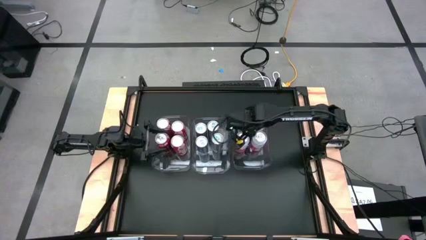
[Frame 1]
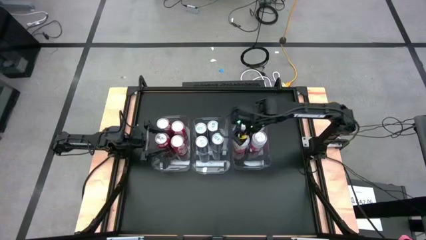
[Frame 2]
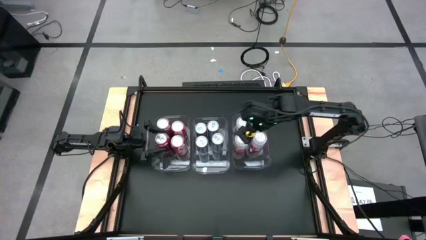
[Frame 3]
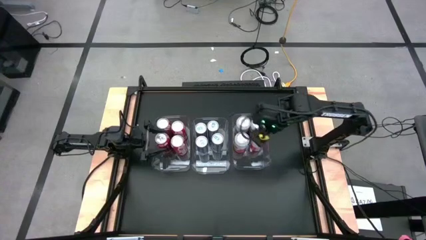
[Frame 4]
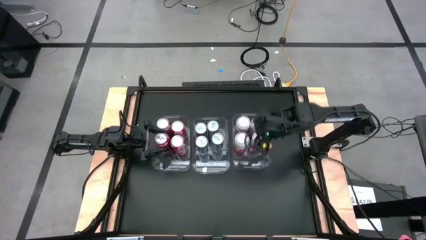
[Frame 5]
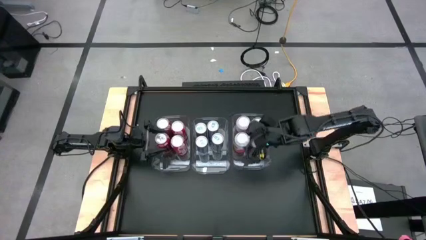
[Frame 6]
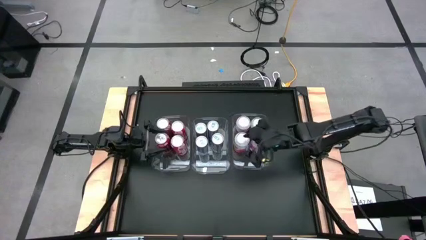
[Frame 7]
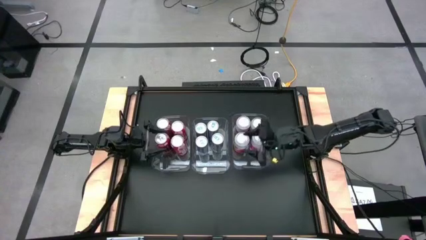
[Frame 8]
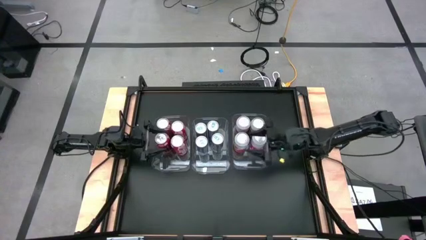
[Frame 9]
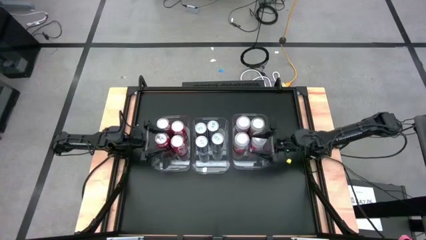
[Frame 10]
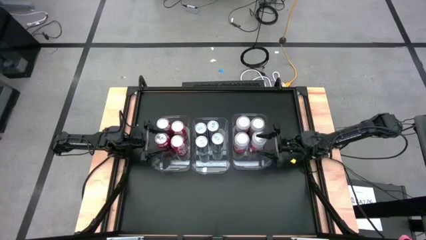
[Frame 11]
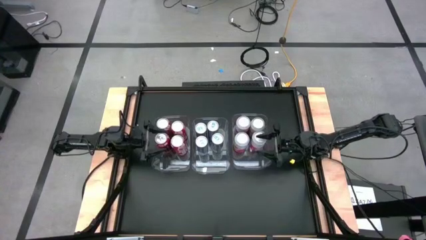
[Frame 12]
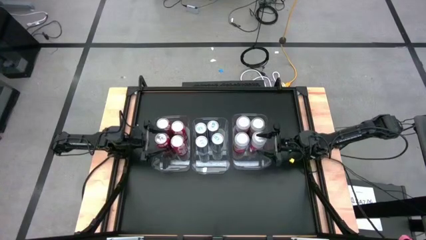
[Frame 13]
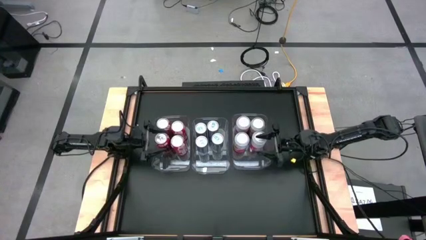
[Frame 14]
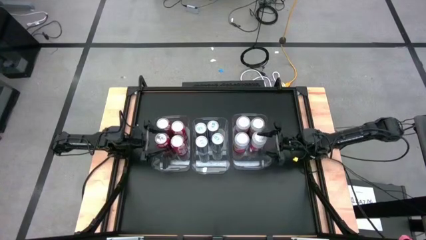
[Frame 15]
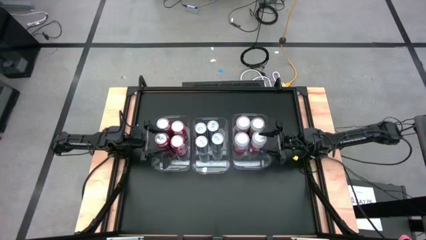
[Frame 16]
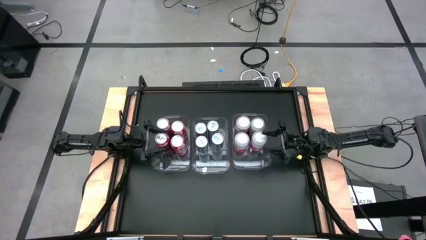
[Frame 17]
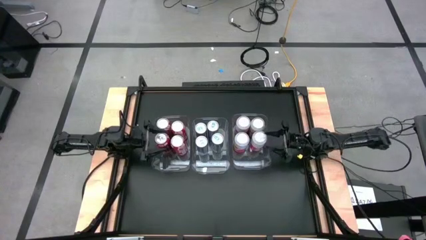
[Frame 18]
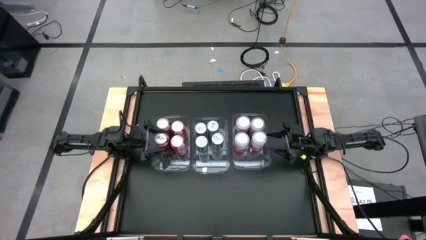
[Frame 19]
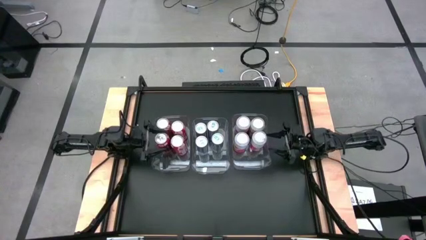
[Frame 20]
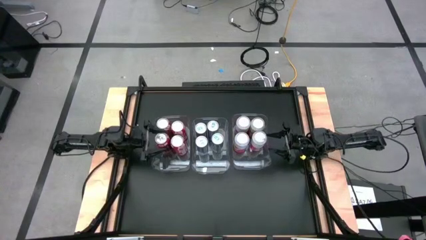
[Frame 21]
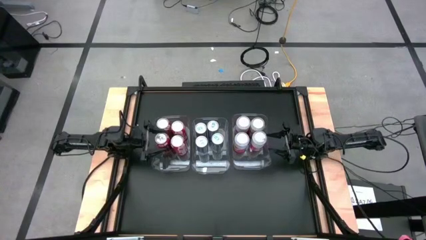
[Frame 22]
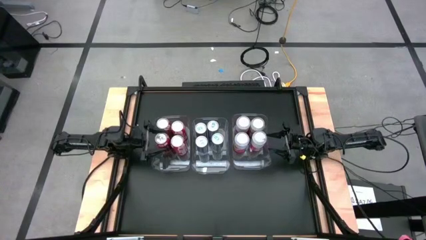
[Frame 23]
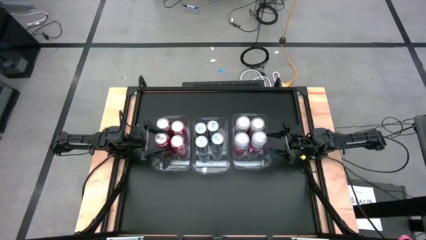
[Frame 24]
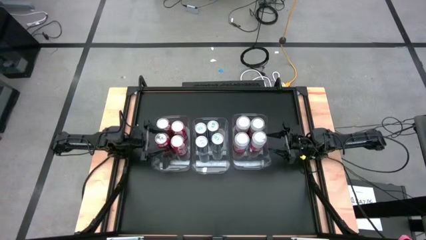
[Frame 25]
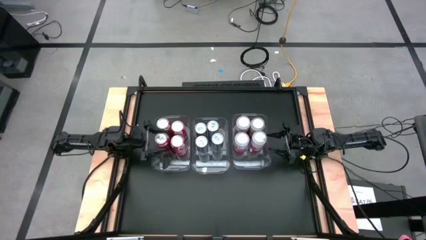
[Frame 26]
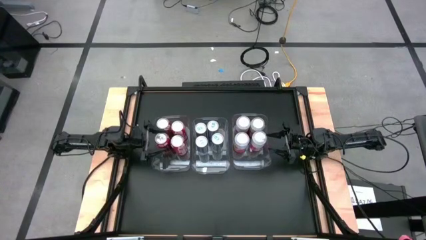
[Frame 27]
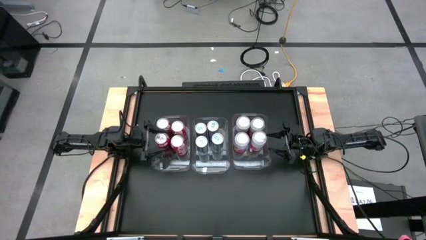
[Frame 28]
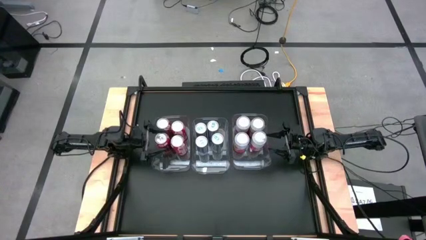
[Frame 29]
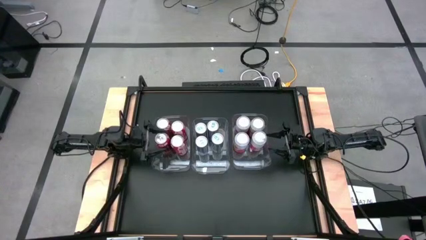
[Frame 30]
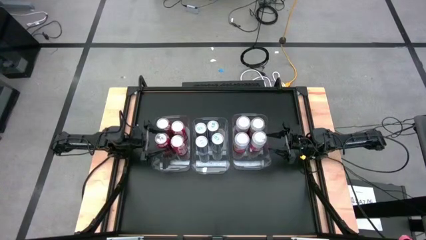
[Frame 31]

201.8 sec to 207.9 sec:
Task: Sort soda cans
Return to Home Position

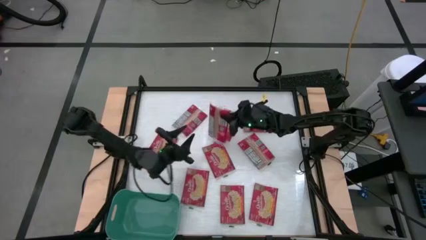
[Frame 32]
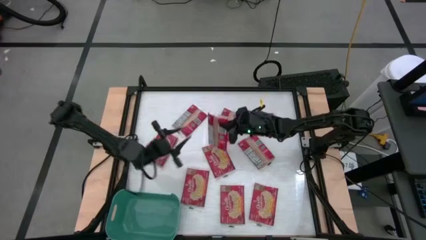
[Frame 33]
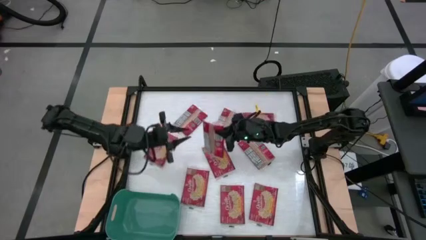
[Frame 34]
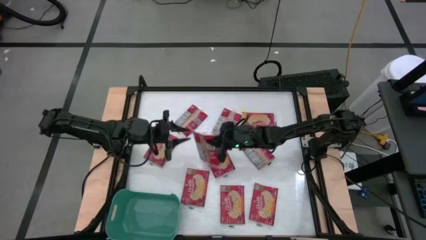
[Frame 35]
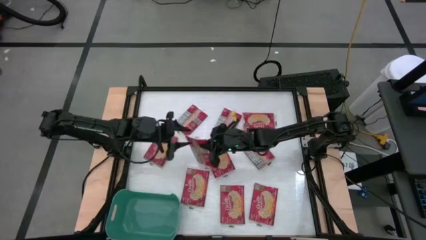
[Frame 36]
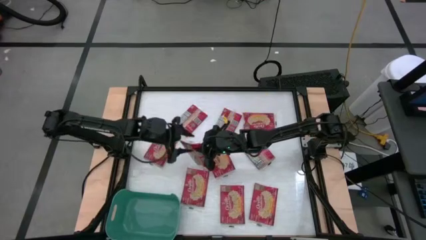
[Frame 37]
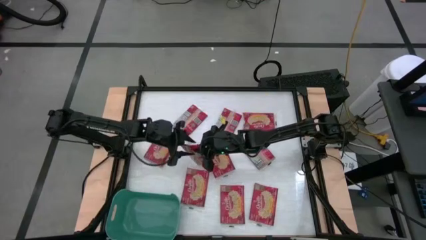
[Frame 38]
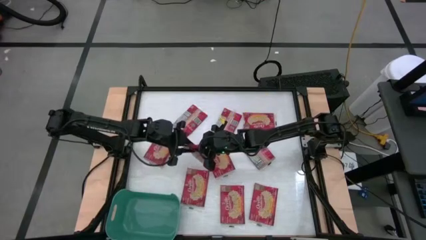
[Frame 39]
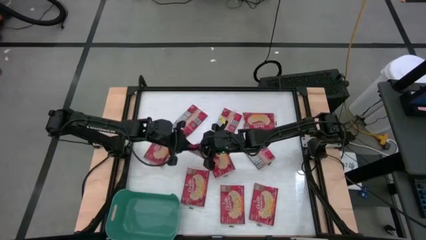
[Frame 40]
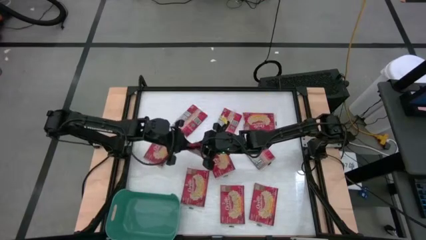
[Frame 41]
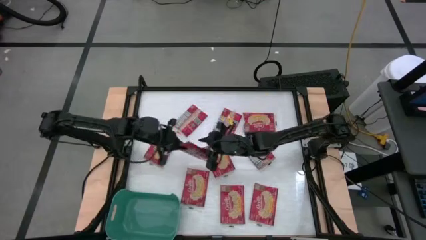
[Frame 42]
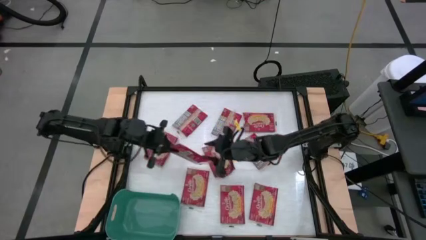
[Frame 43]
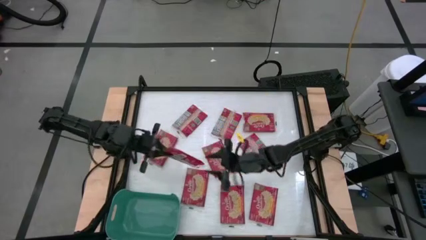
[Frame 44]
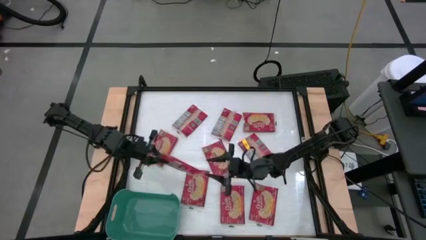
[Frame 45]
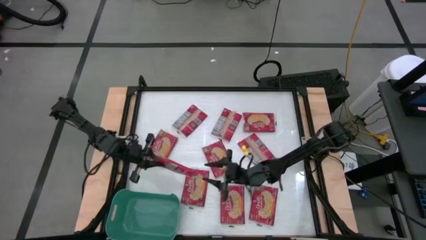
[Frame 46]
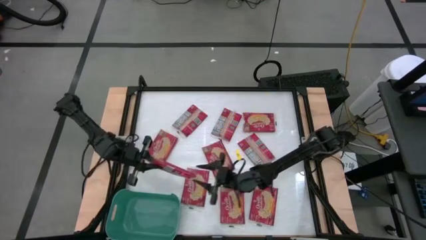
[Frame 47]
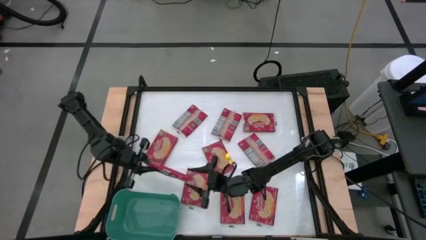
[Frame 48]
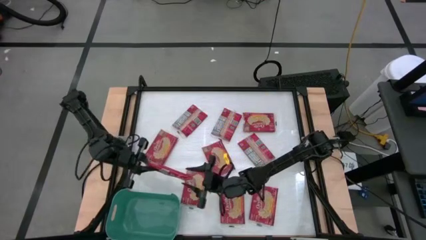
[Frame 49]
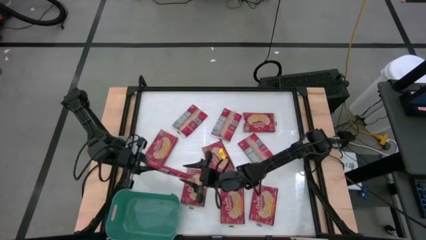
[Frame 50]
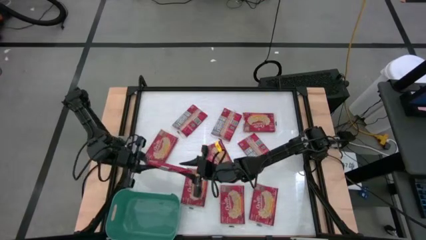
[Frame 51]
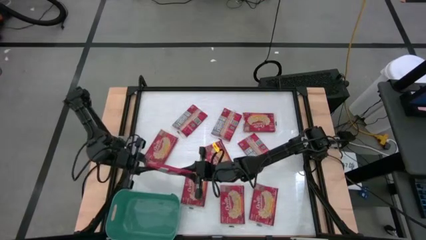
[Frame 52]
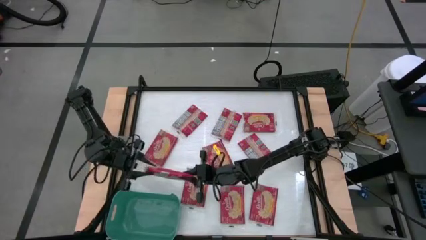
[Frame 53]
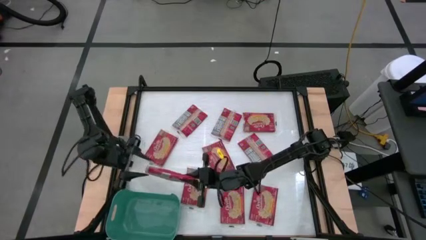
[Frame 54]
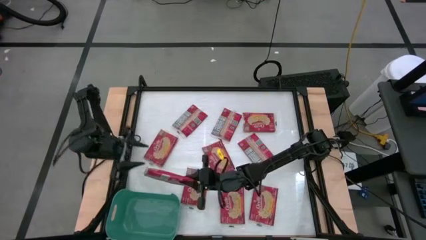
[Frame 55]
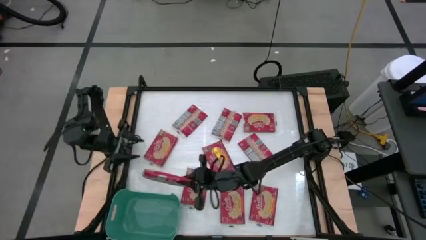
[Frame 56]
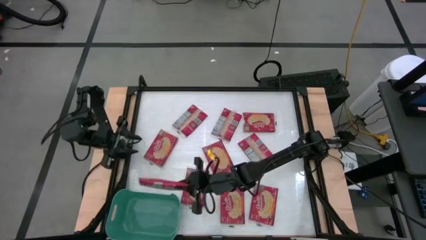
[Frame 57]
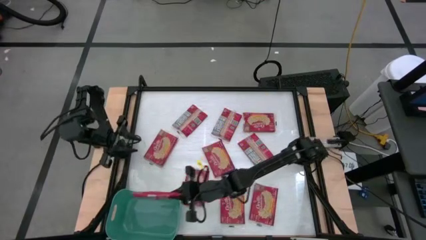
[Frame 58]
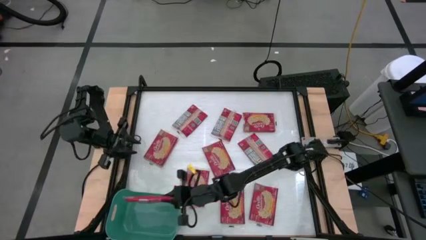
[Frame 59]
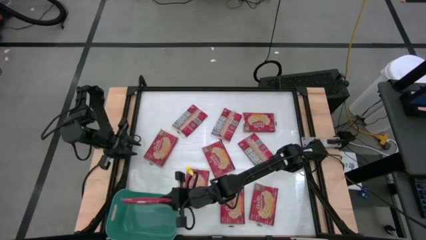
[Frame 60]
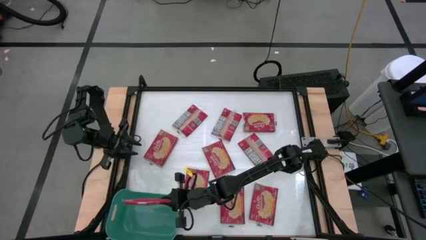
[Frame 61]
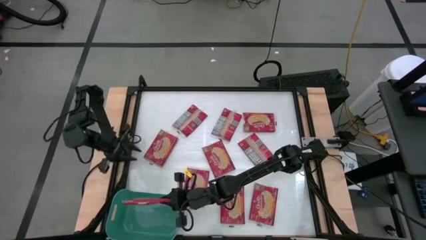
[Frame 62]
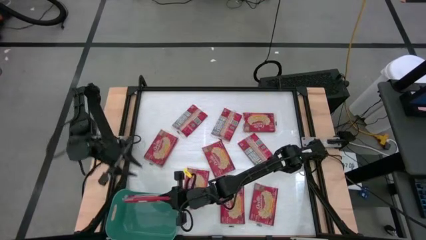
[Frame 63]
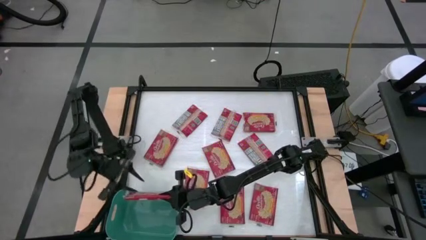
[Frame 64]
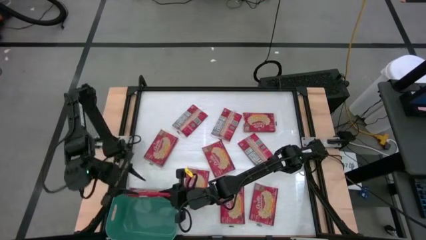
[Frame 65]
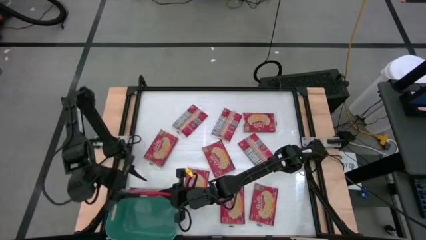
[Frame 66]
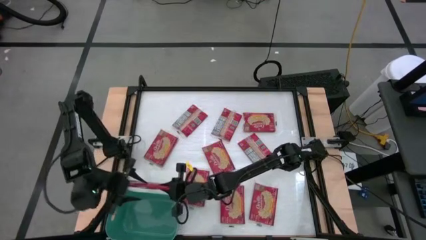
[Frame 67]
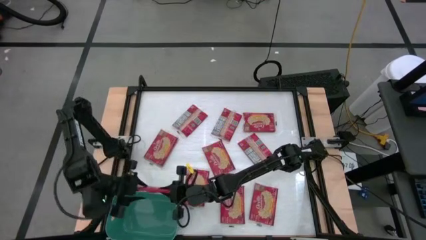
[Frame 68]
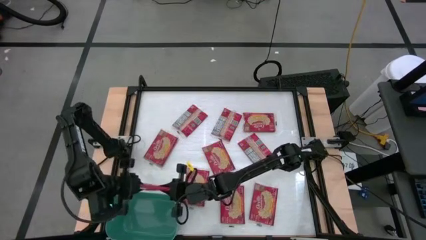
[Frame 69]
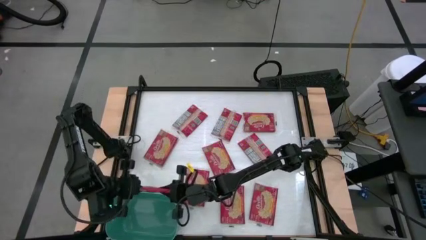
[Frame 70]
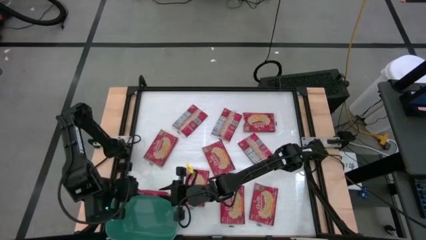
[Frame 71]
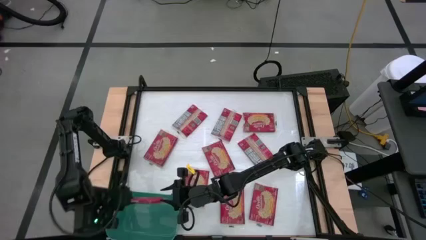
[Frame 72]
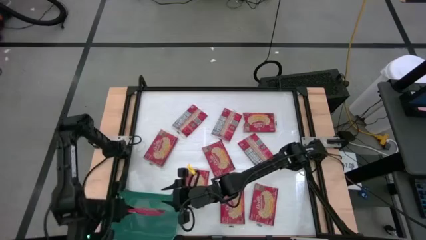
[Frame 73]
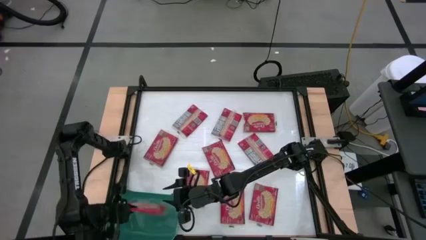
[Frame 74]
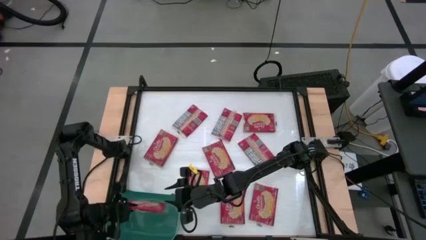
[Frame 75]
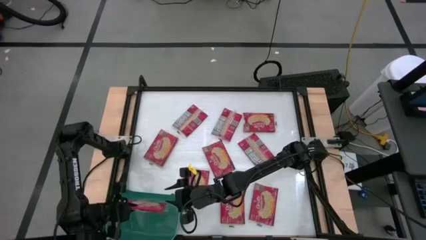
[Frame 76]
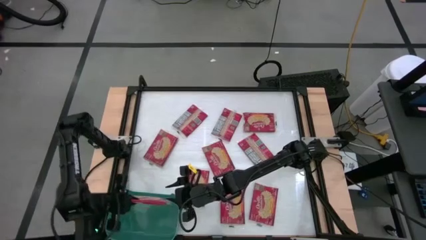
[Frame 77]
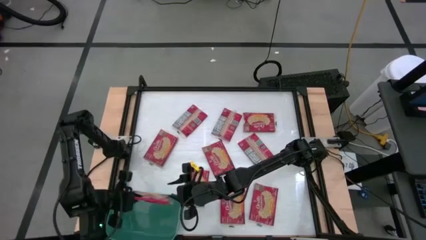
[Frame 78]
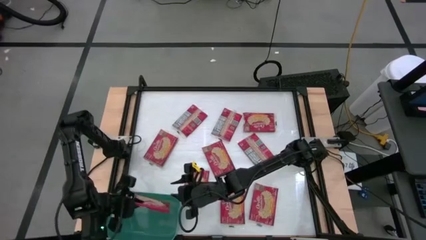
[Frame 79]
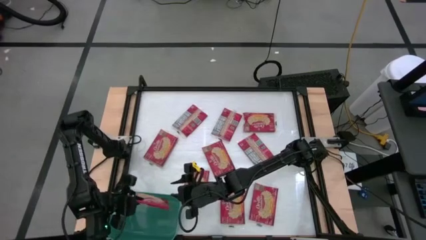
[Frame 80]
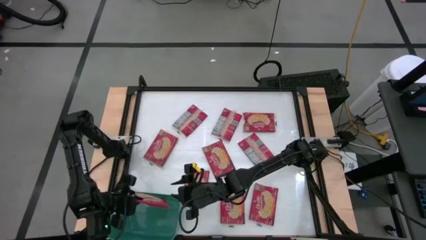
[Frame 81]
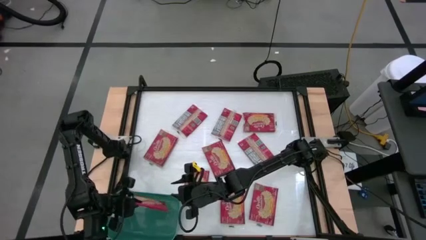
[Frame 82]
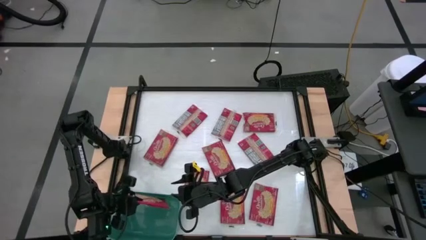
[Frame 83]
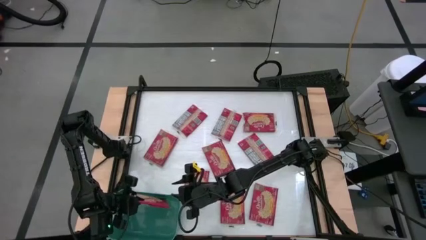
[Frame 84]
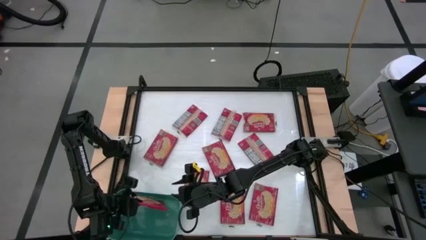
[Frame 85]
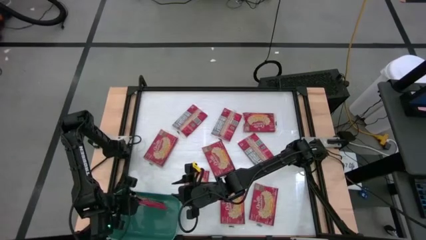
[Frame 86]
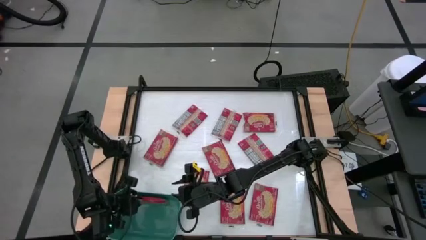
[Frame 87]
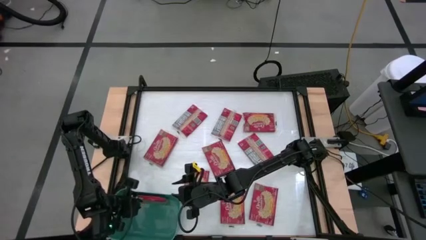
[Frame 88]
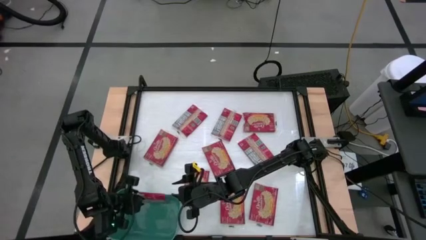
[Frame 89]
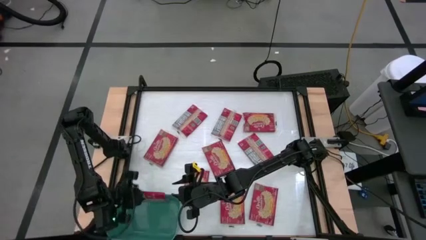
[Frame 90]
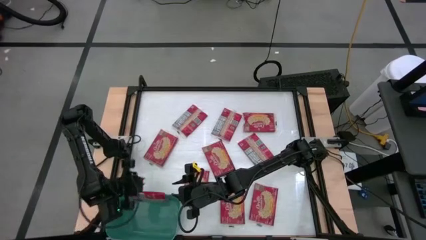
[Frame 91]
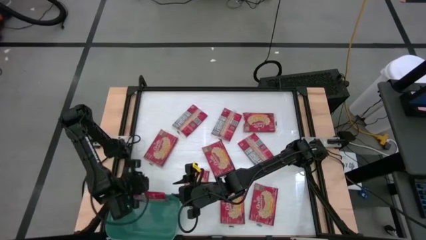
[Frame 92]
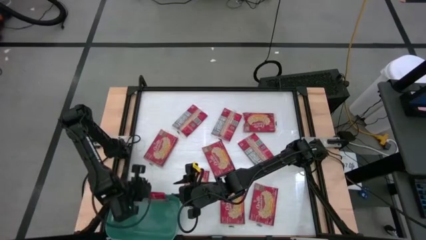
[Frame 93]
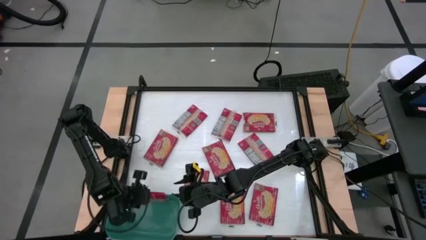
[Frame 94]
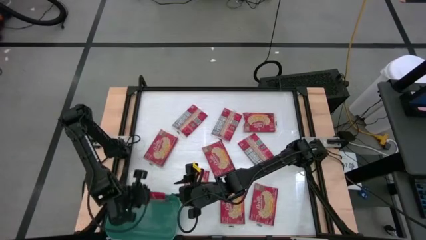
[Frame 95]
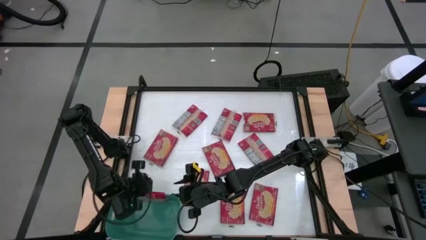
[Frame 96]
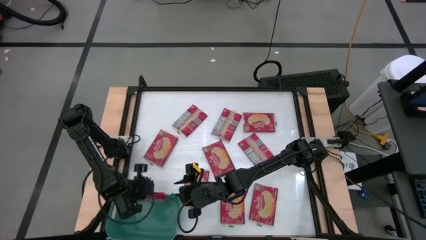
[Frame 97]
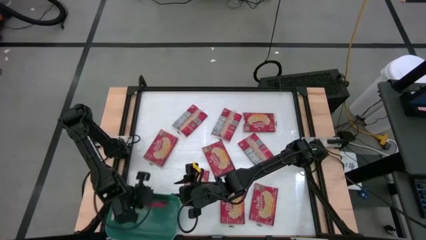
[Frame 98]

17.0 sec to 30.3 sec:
Task: Sort popcorn bags into baskets
Put the red popcorn bag into the green bin
